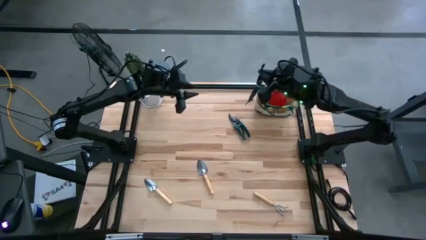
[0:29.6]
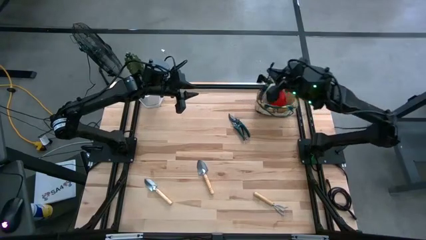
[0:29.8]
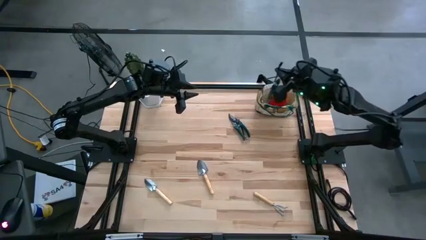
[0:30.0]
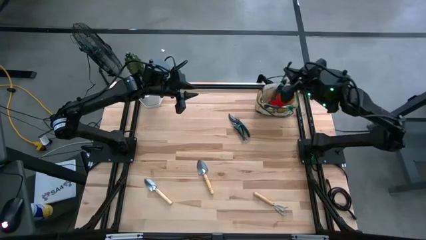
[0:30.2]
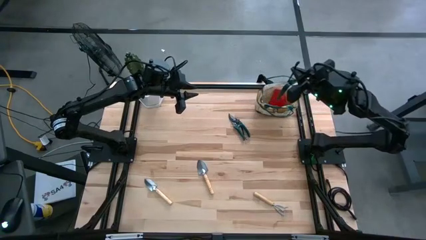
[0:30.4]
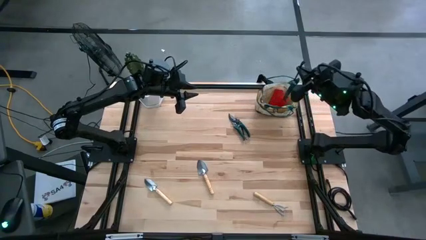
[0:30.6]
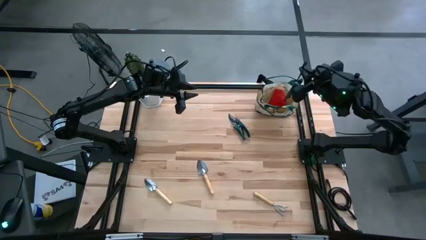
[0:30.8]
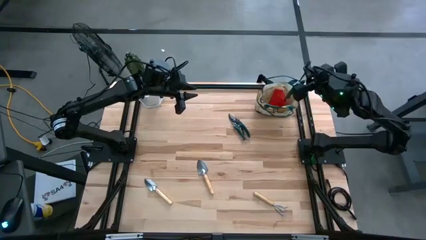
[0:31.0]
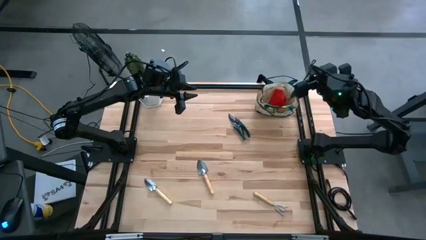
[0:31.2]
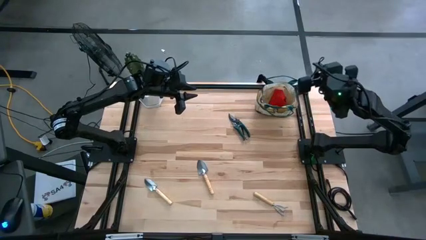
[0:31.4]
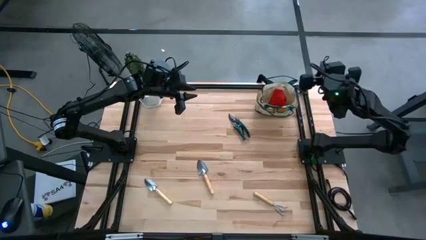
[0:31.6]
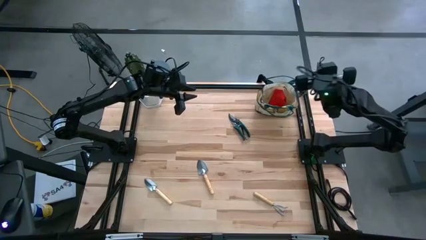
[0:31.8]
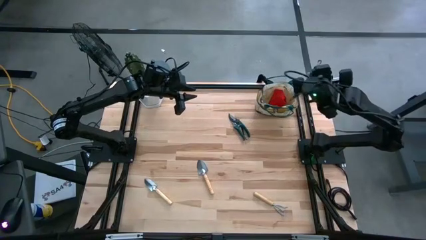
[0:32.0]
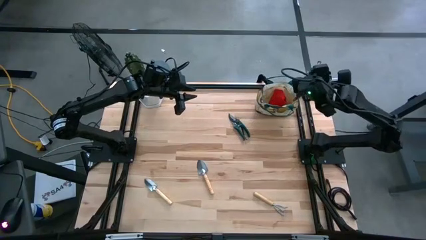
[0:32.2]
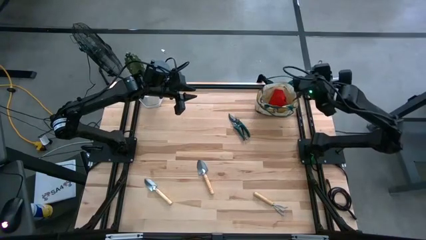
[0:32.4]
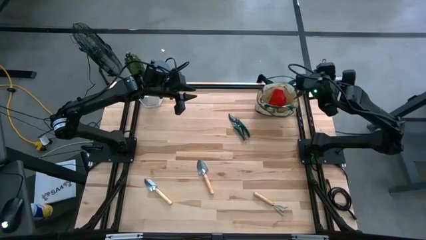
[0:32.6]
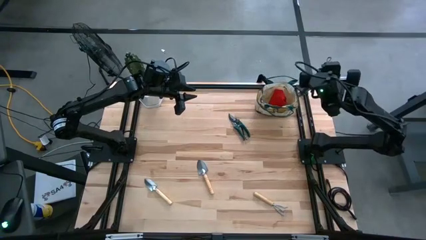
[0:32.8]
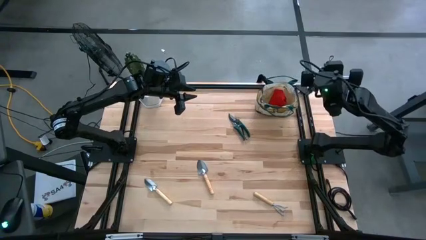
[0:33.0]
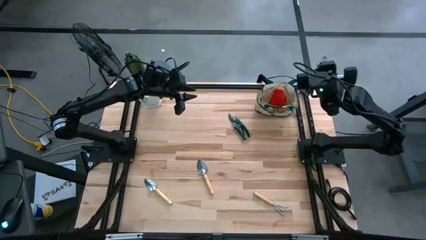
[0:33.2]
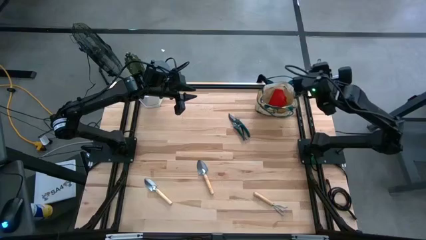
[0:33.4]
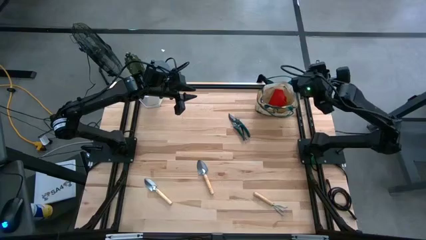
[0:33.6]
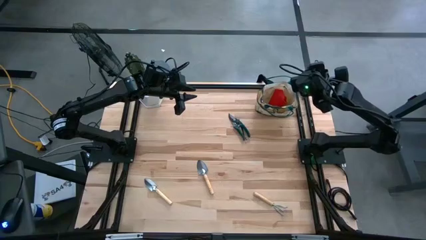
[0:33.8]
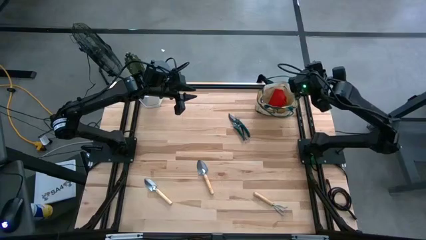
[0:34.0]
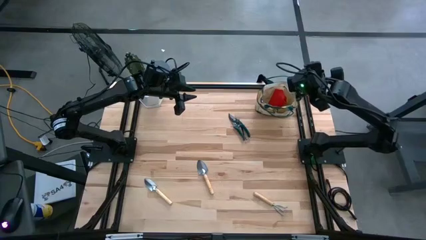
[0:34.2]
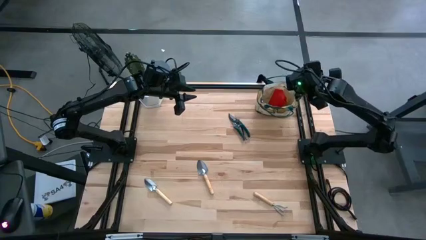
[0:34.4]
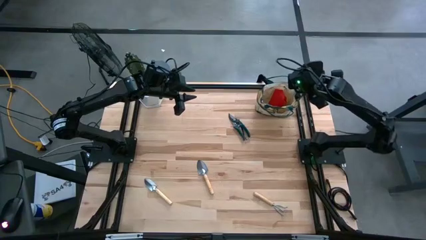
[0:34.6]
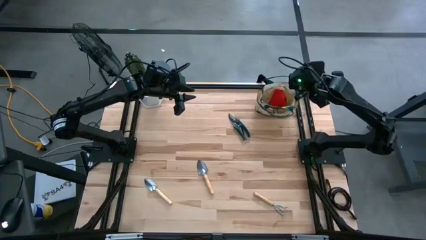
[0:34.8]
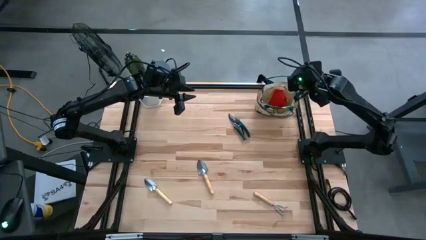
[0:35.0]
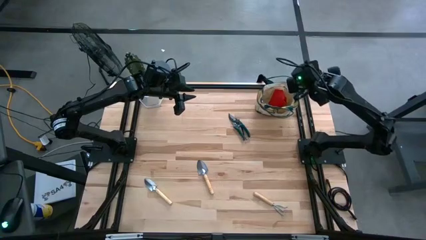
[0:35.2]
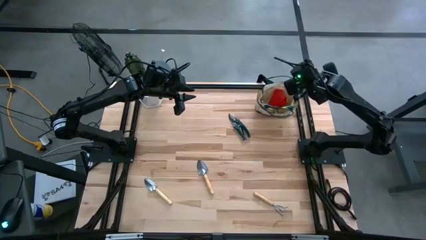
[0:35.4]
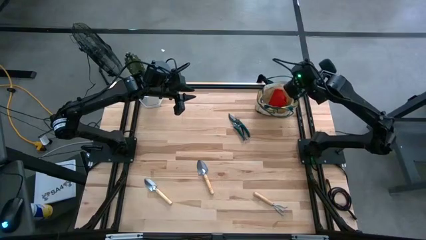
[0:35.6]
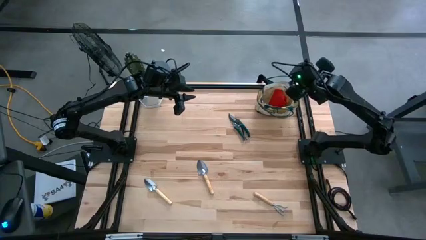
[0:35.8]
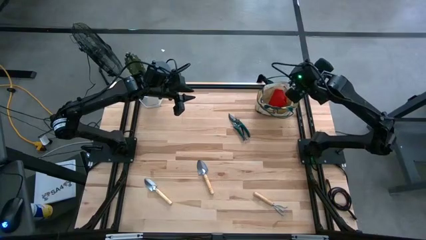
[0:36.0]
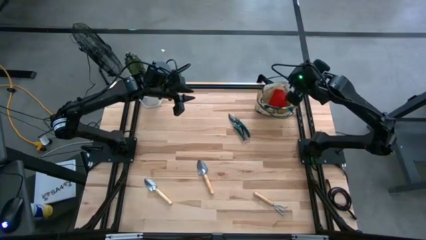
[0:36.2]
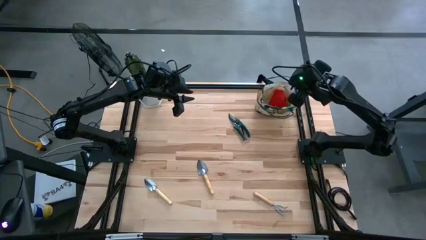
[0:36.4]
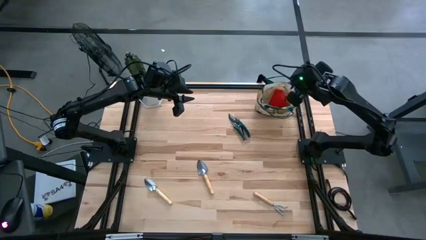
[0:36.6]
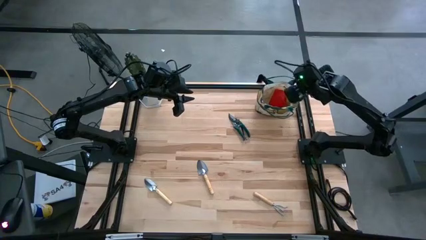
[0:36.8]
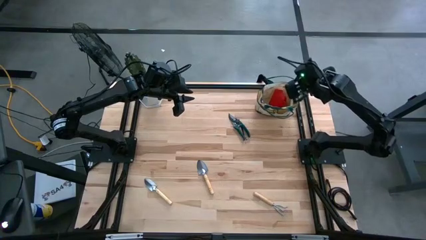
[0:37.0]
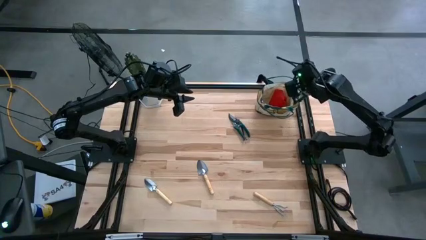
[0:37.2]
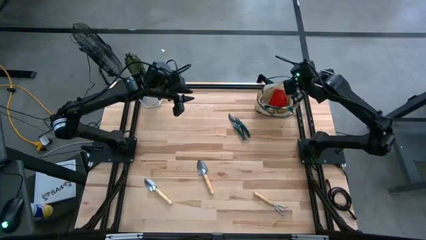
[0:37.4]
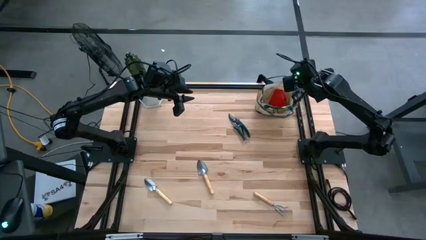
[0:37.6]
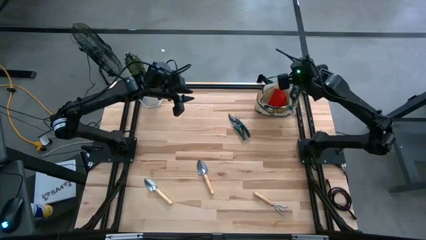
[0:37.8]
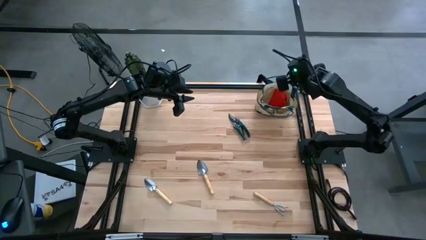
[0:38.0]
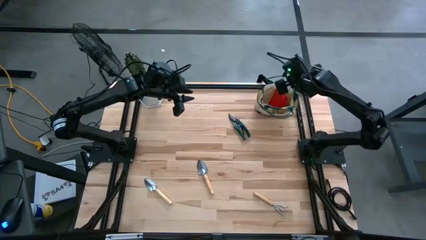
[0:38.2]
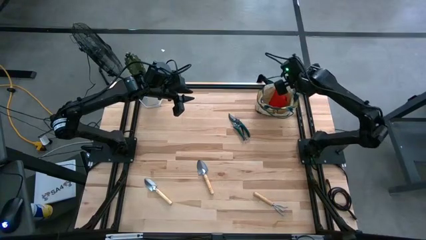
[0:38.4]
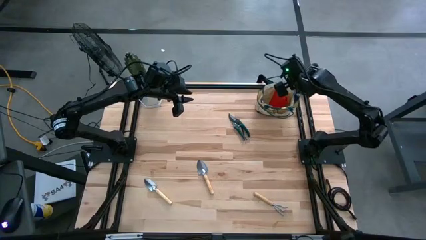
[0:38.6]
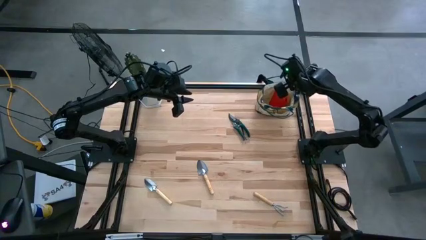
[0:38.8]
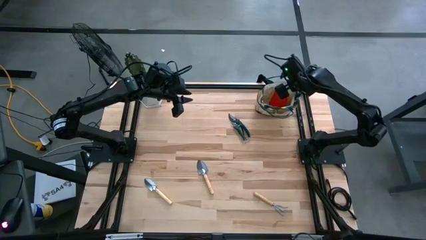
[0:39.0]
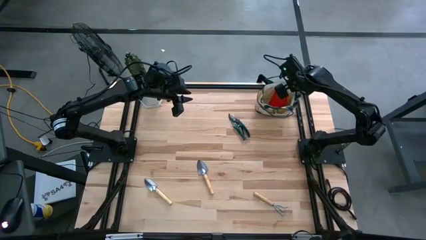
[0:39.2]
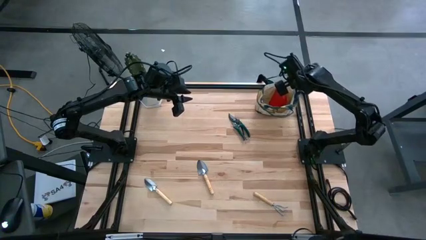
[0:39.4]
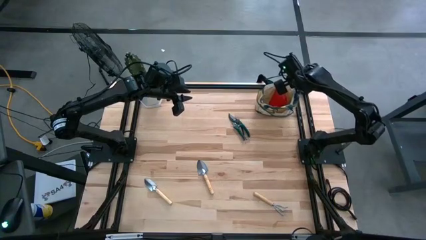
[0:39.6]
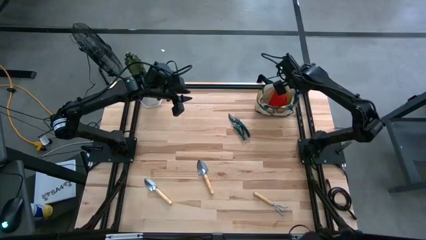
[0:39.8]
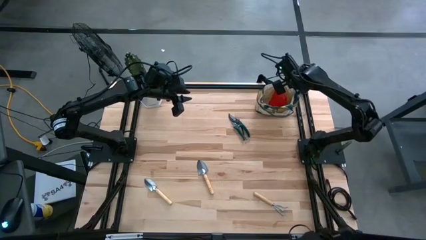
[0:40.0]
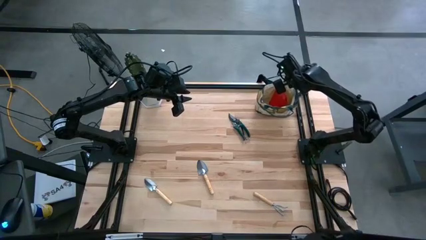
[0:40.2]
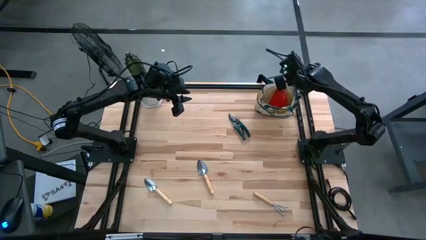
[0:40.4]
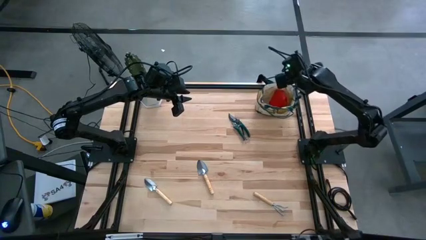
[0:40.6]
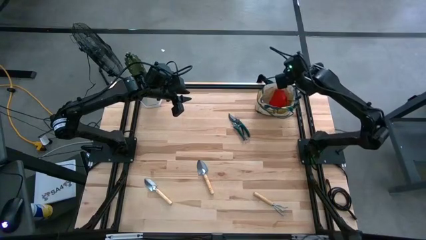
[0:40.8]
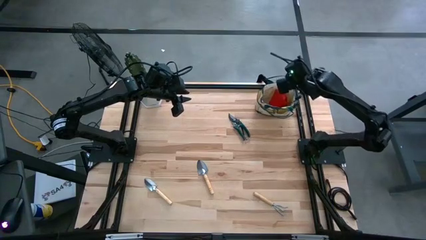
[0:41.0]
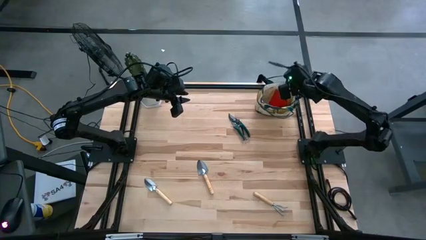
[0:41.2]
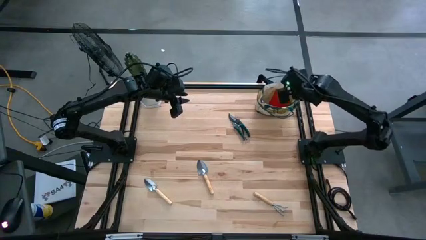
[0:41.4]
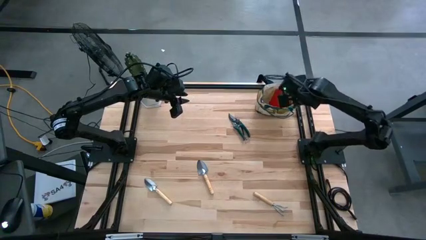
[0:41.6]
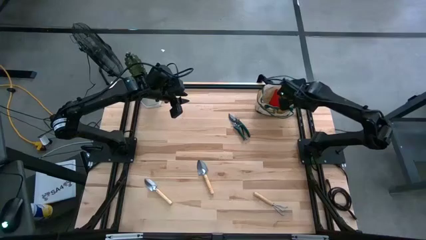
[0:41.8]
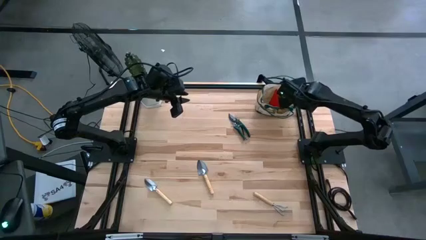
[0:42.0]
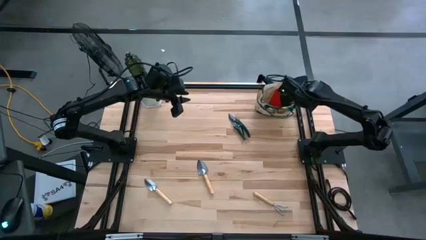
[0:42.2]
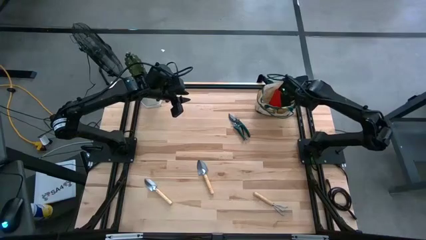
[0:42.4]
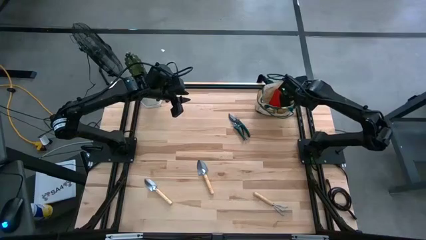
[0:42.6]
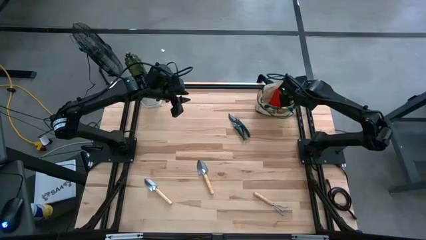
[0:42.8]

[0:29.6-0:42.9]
Task: Pick & Place Garden tools in Gardening bag
Put the left green shear scissor into the gardening bag
